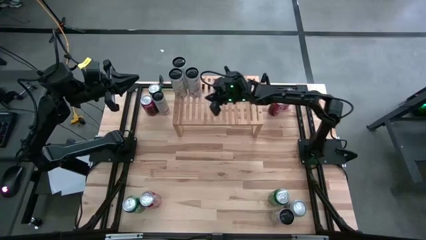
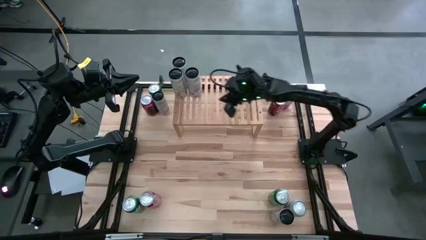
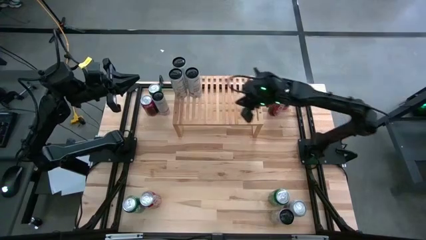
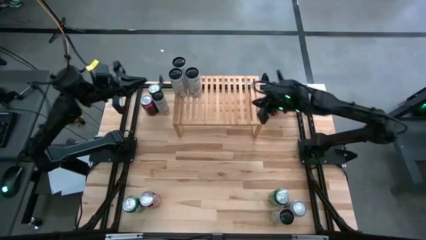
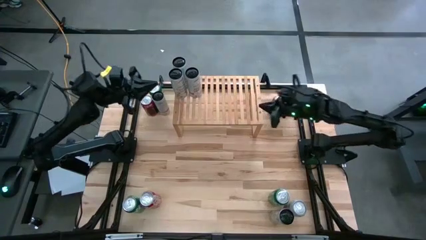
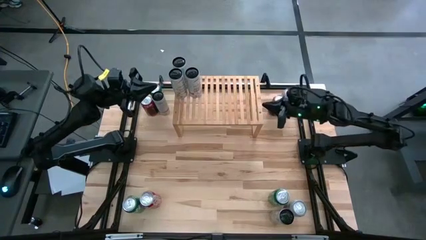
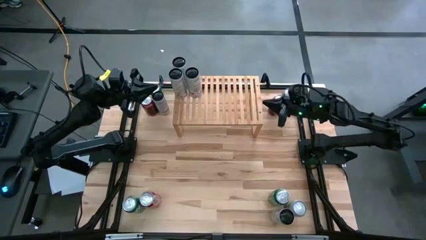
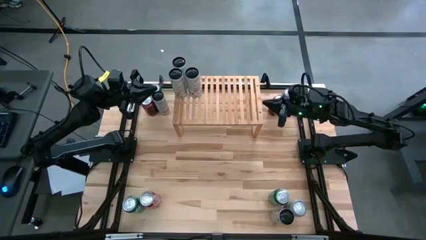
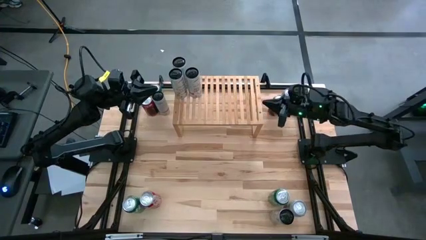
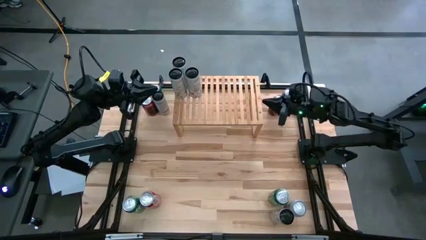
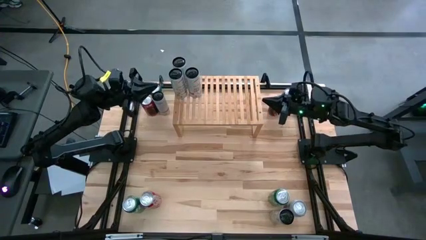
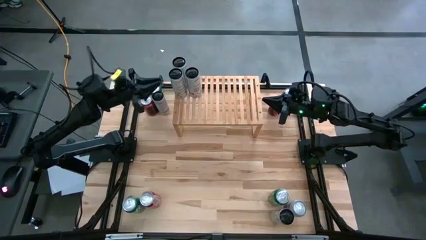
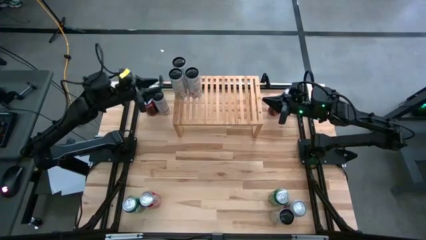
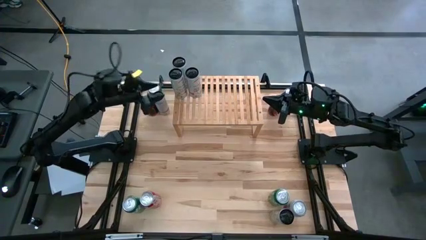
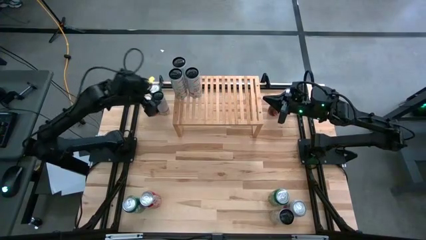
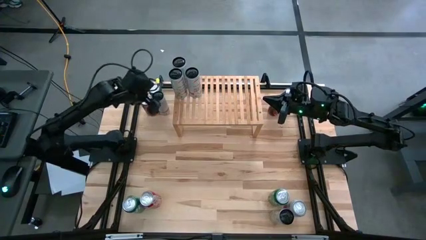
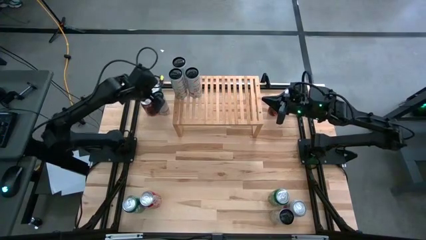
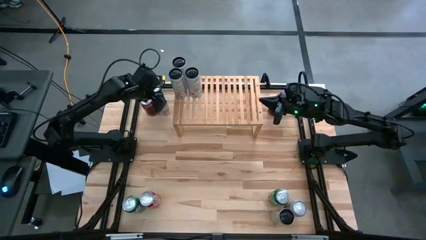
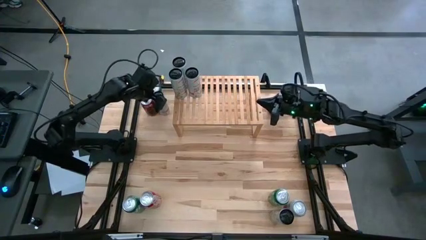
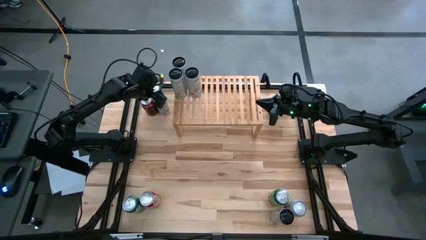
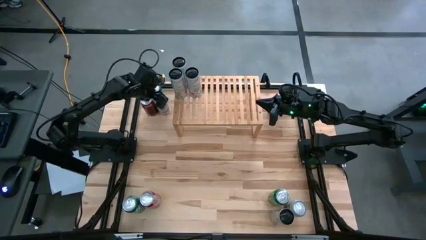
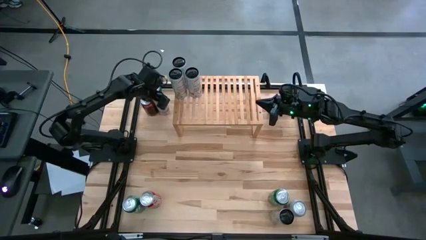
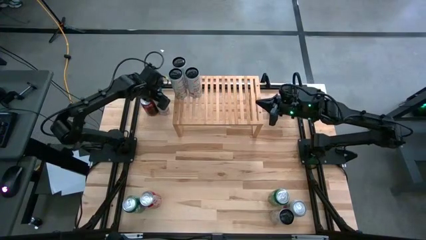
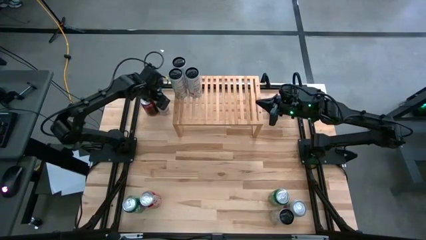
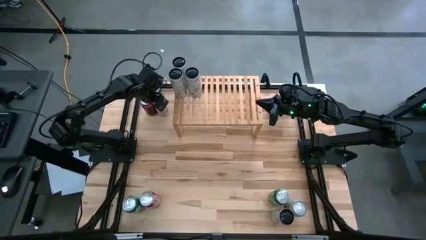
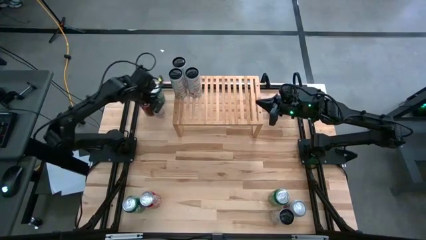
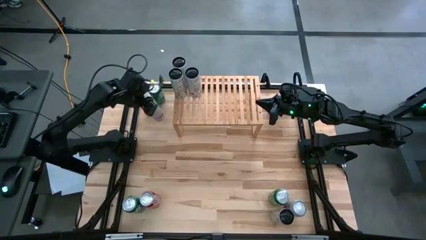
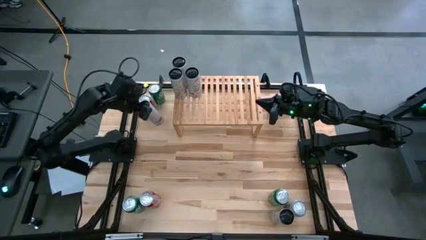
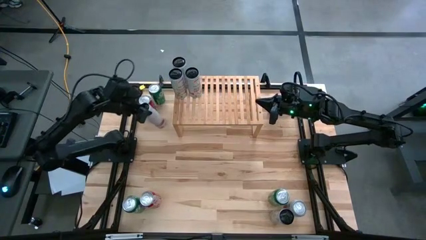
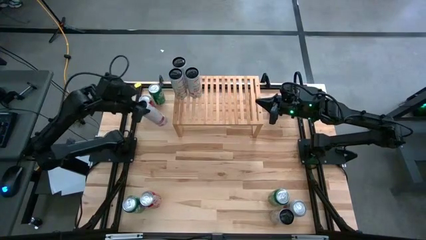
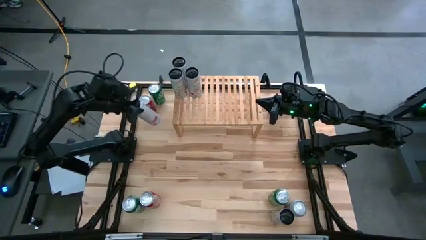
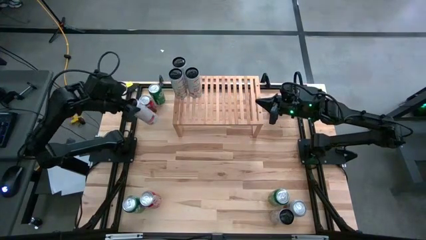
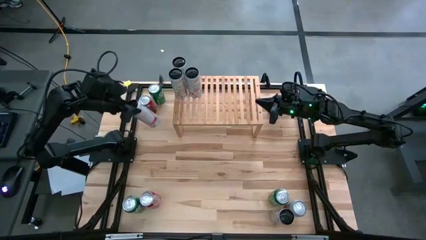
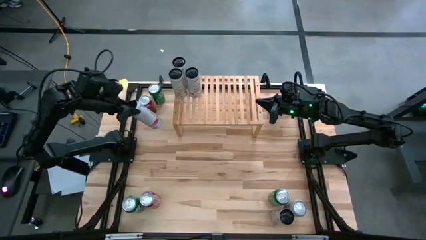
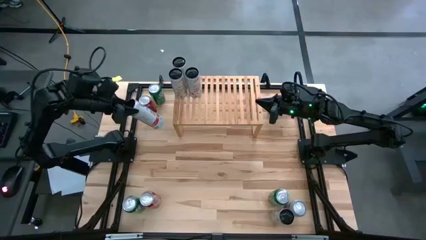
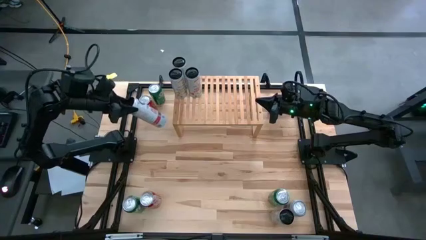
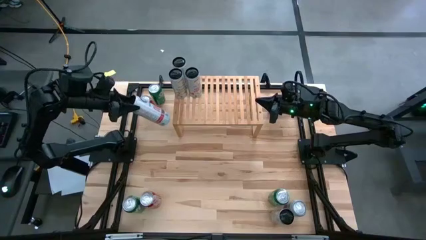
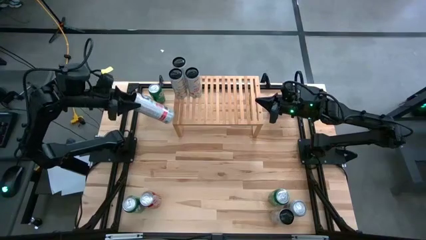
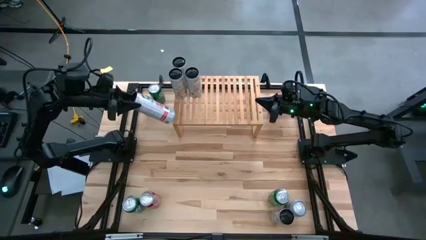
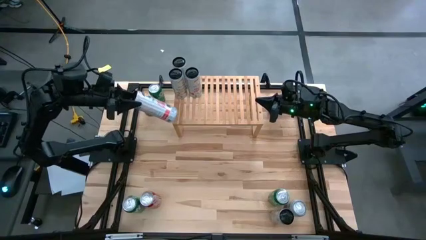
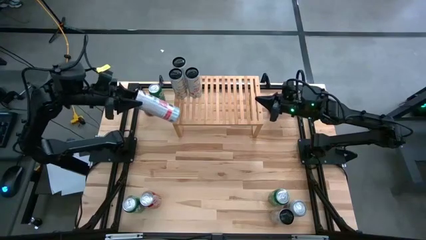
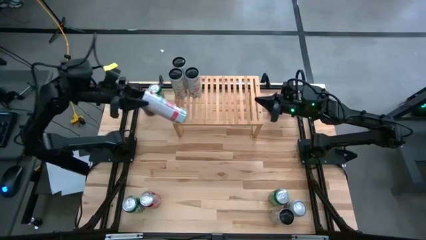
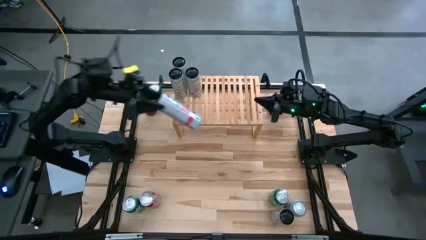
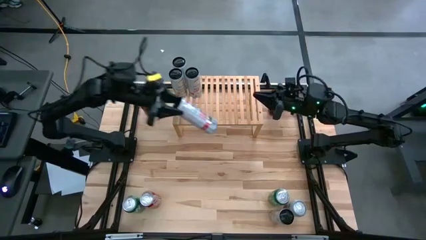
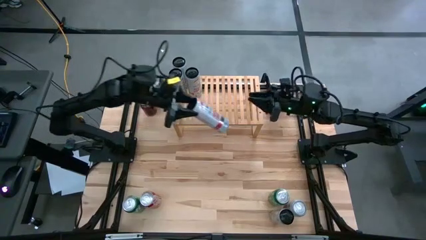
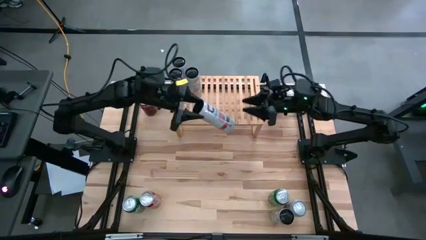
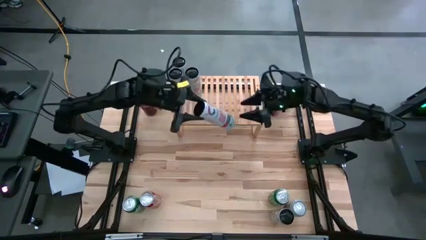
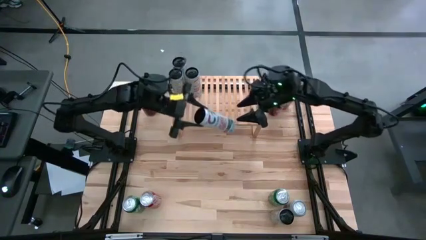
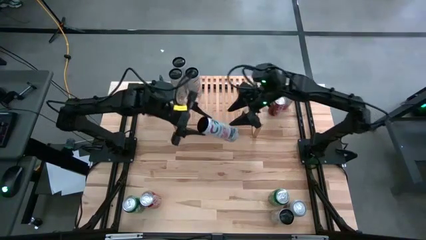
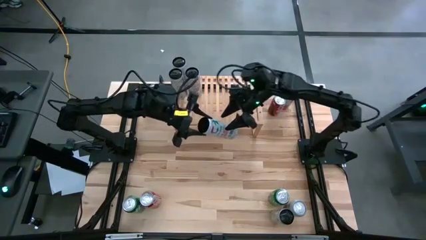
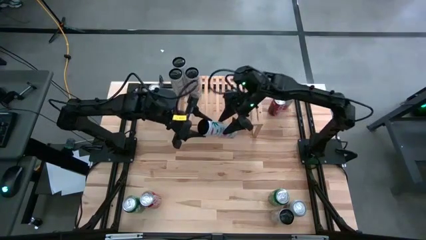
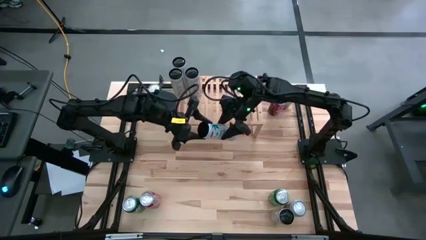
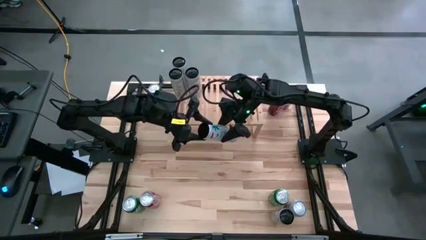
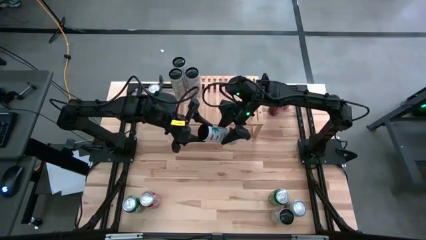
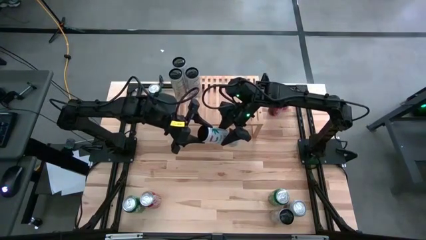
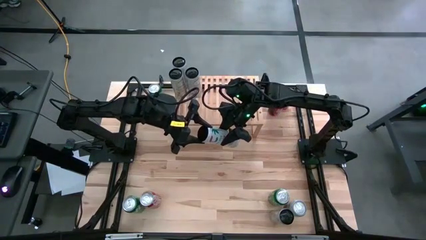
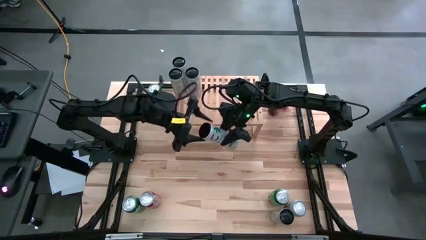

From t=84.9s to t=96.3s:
Task: Place canned beverage on shelf
Put the top white pink soda can on the shelf aligned with other white pink soda can
